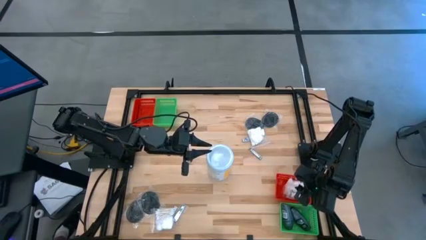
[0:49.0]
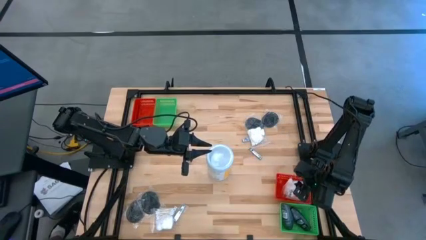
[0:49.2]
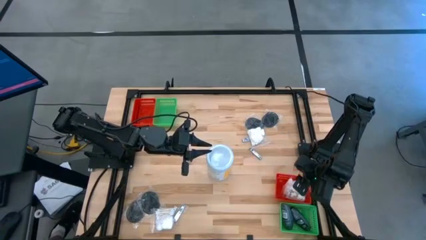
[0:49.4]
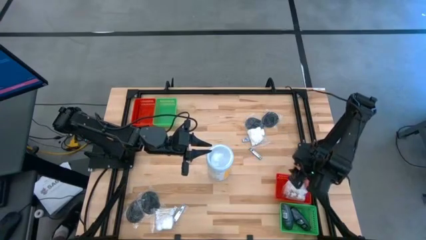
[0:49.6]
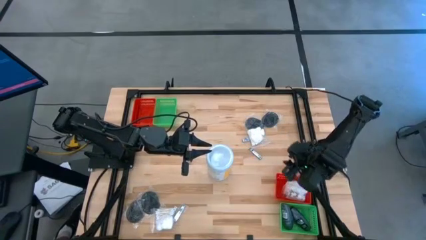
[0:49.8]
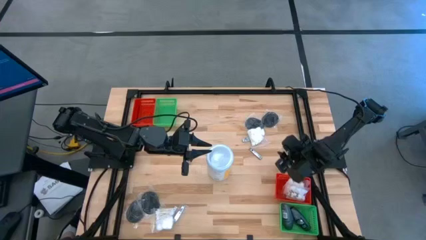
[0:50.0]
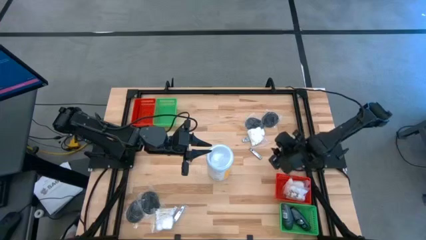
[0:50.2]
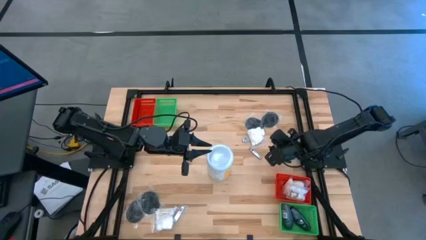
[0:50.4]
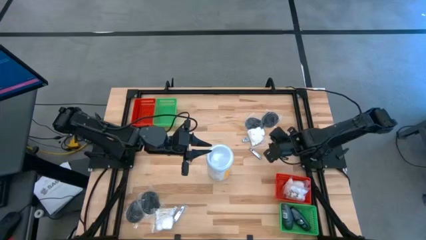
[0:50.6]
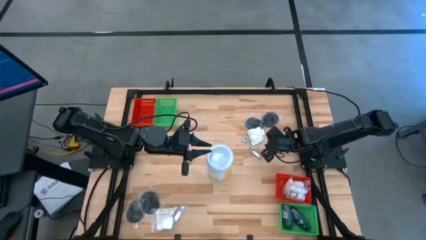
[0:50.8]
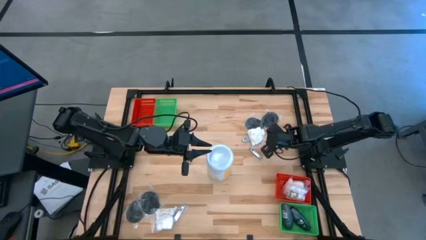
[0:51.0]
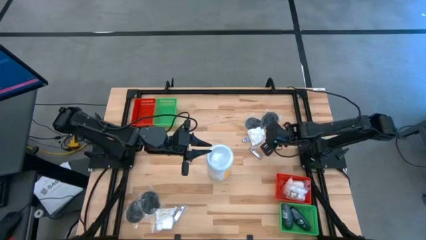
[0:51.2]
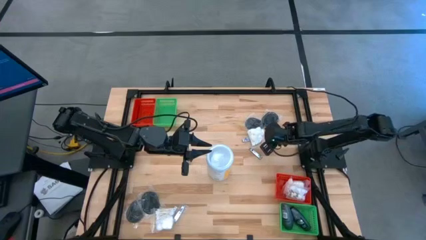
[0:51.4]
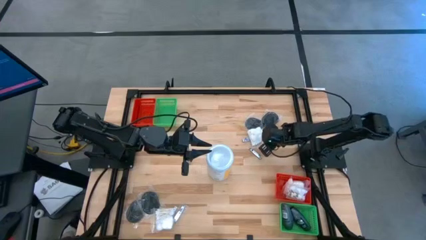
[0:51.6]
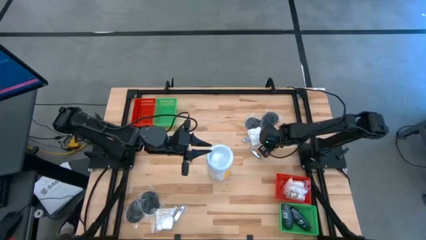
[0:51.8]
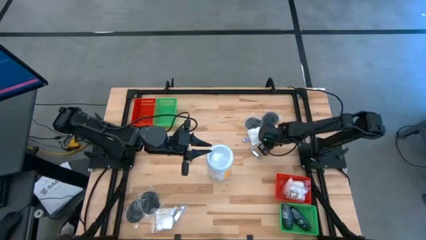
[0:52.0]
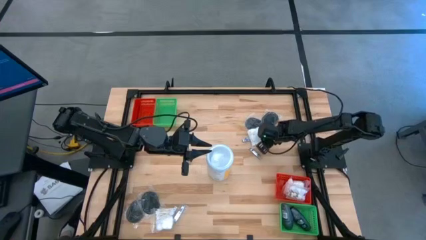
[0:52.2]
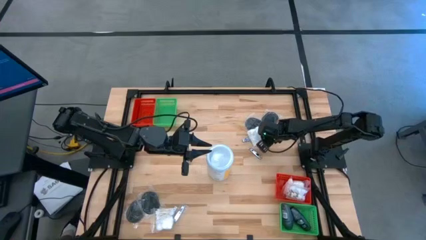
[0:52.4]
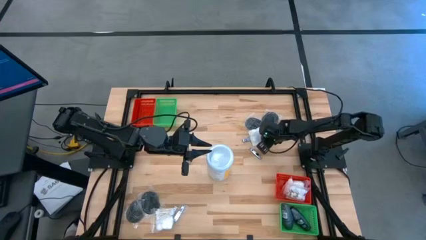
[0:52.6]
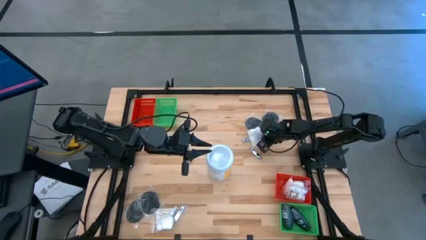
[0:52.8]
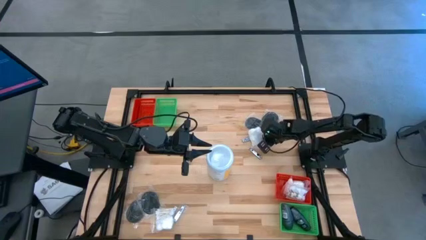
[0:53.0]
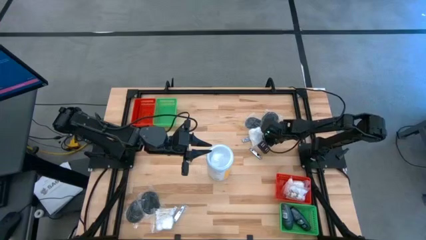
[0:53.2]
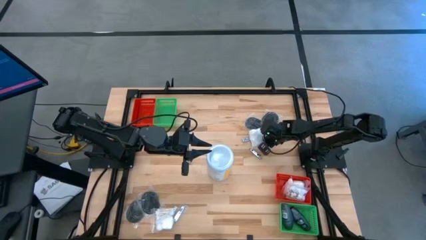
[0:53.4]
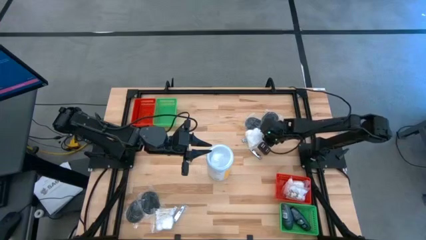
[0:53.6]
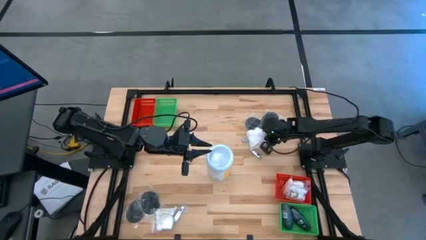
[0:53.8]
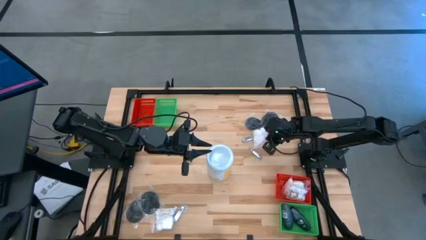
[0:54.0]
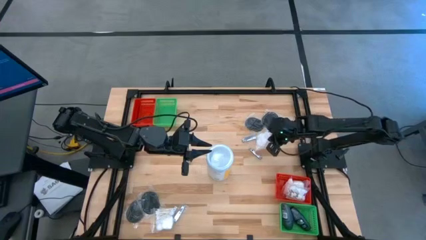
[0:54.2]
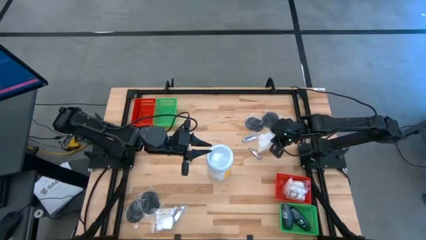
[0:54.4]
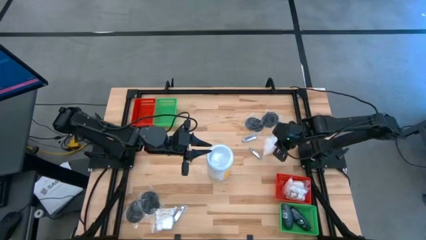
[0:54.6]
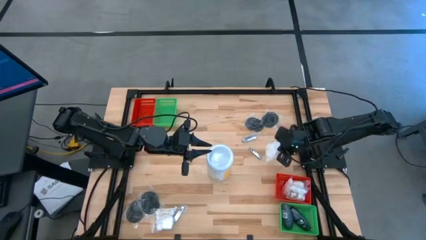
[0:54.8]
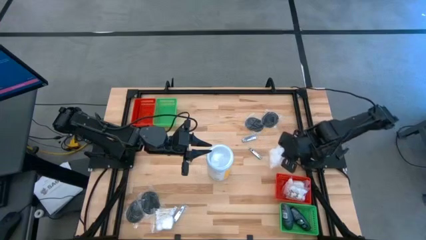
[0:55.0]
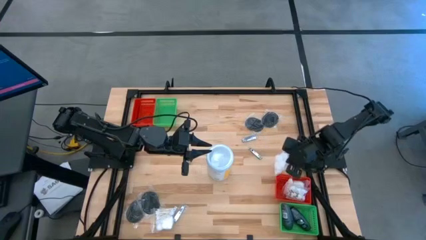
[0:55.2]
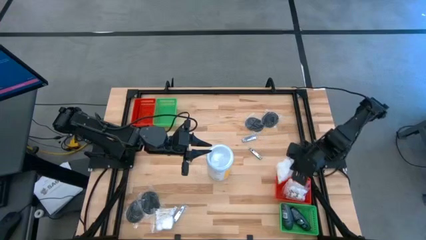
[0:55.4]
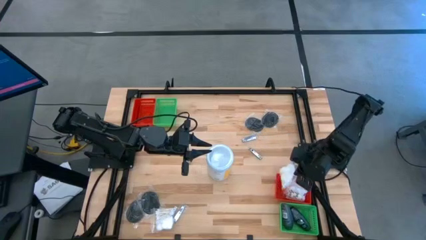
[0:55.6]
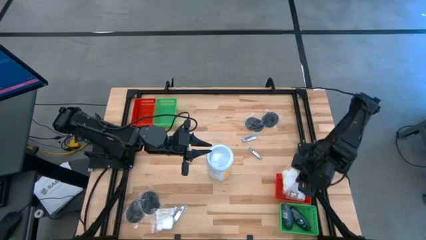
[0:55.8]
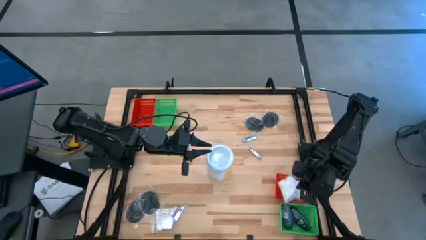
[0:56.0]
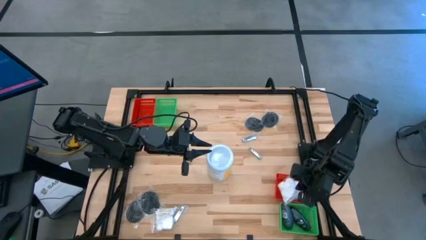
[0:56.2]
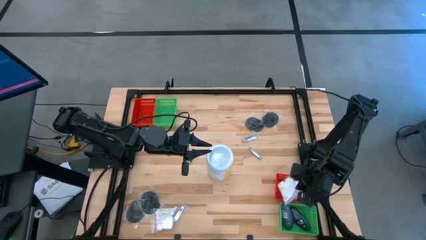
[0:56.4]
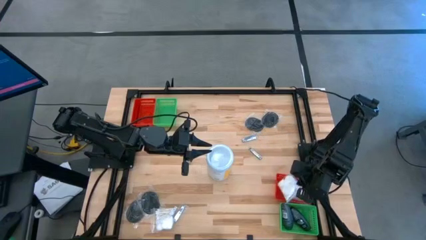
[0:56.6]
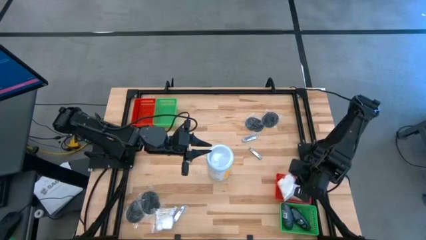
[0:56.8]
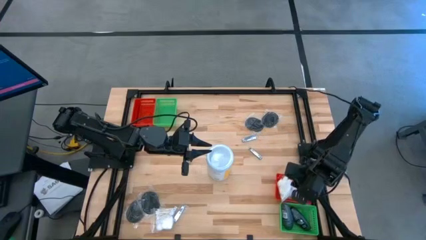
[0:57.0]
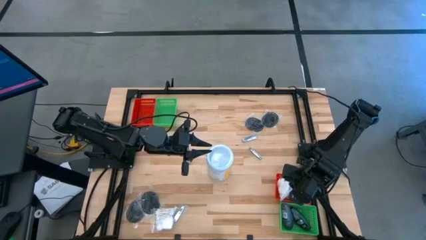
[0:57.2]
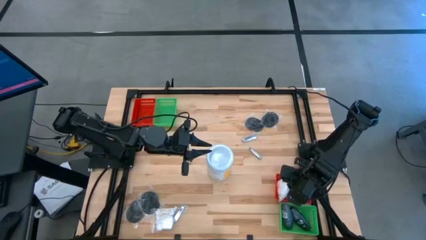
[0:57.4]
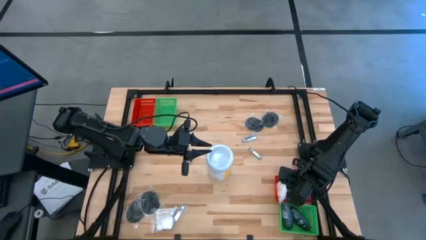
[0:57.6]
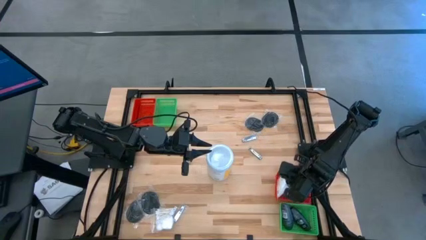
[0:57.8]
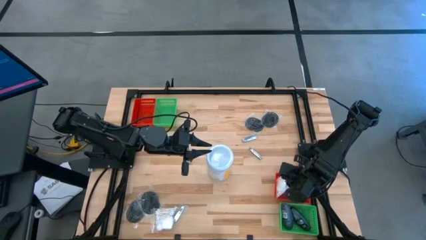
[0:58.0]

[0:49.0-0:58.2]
Task: Pick & Place Travel size toiletries
Put the white cotton pack into the bottom red basket

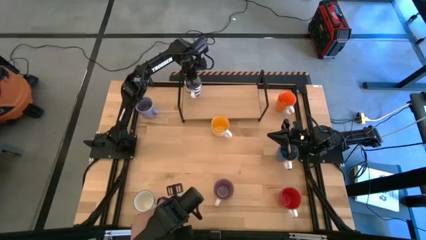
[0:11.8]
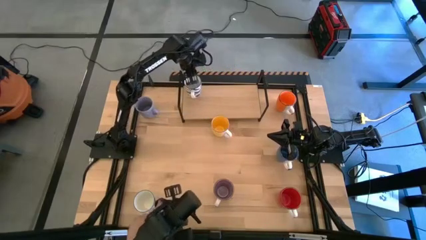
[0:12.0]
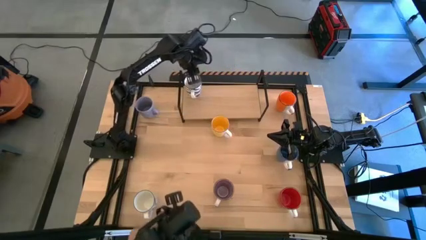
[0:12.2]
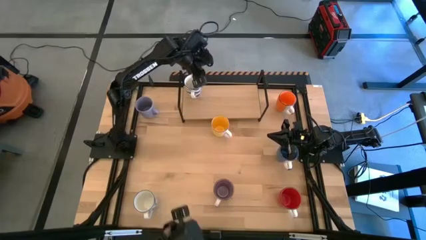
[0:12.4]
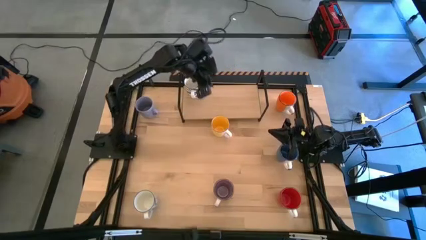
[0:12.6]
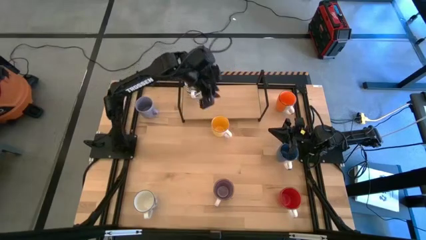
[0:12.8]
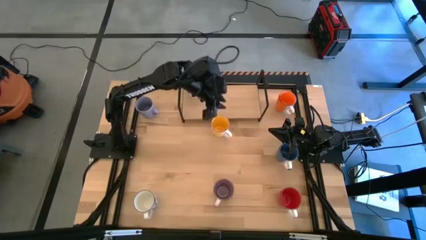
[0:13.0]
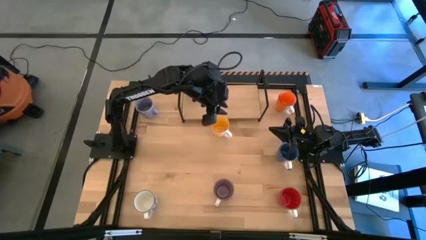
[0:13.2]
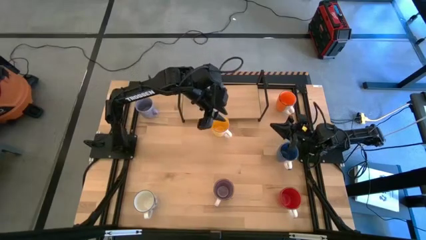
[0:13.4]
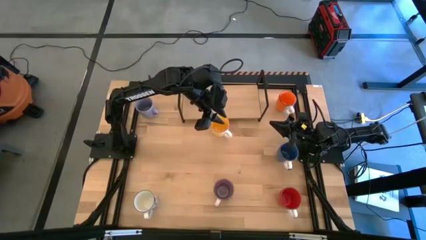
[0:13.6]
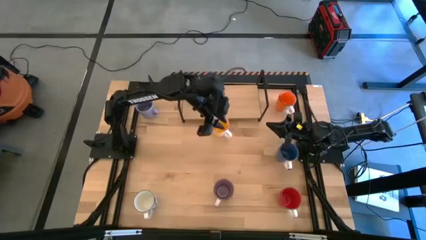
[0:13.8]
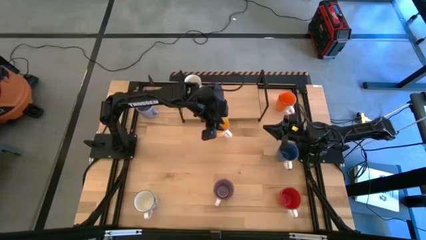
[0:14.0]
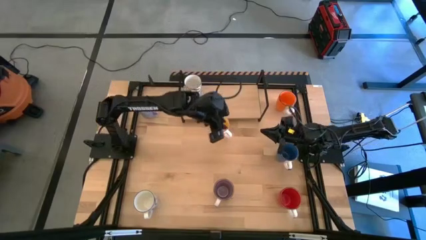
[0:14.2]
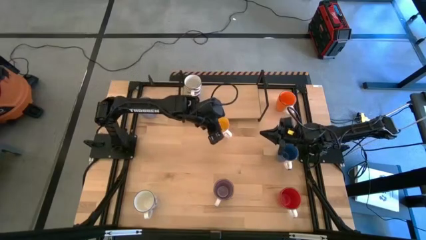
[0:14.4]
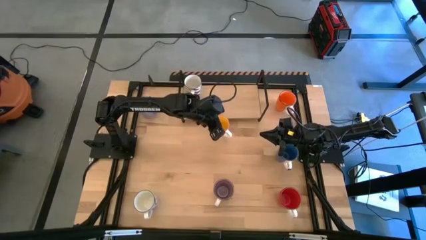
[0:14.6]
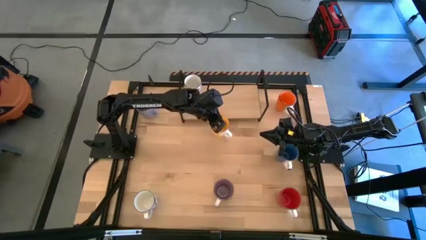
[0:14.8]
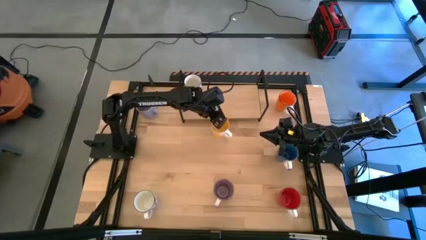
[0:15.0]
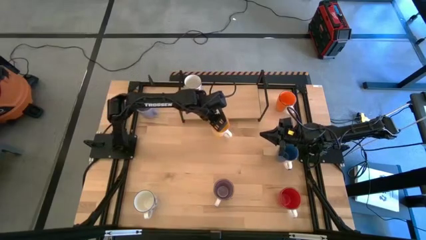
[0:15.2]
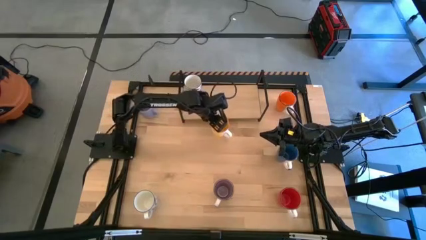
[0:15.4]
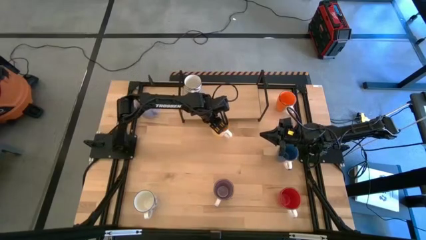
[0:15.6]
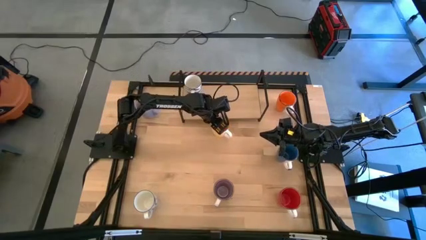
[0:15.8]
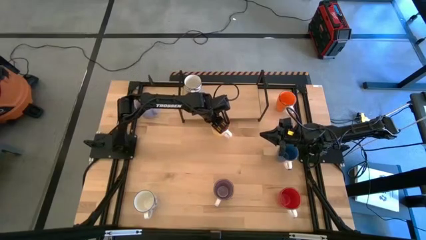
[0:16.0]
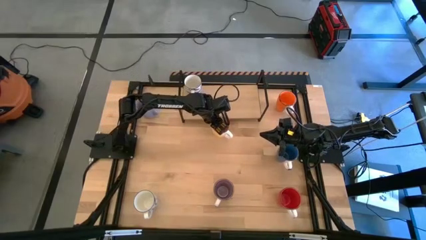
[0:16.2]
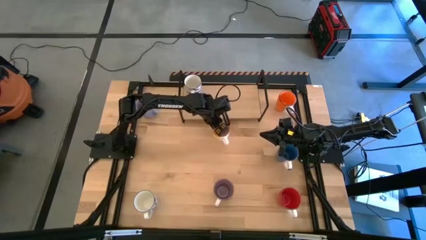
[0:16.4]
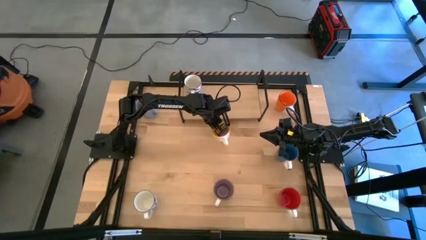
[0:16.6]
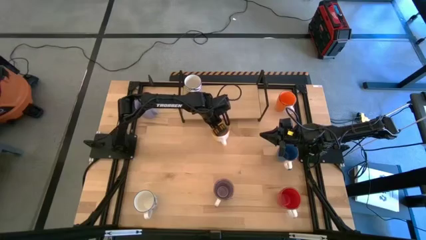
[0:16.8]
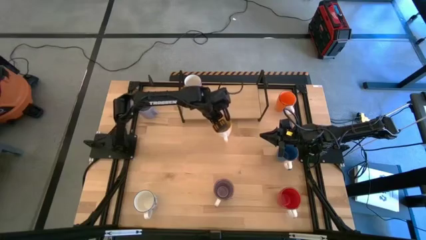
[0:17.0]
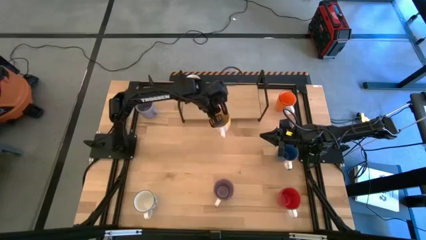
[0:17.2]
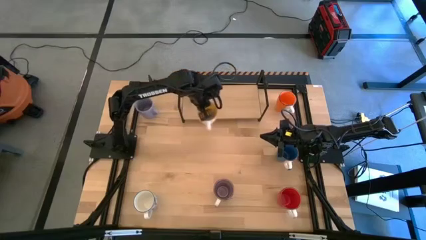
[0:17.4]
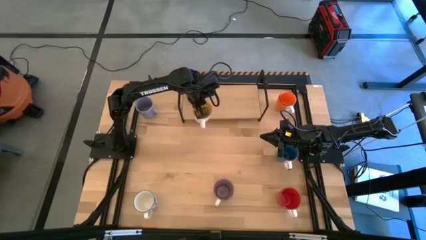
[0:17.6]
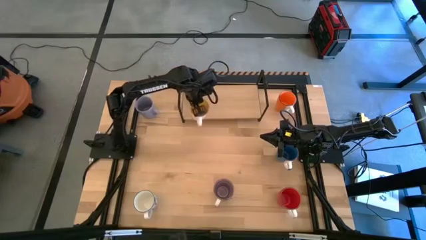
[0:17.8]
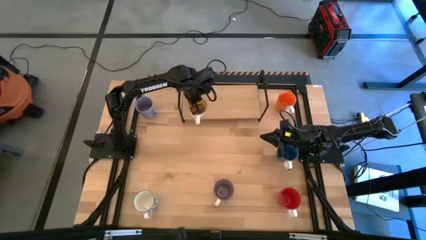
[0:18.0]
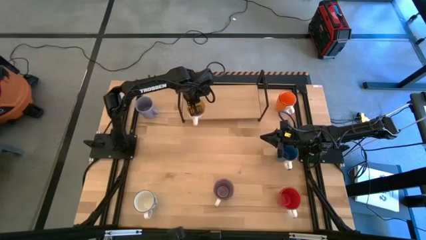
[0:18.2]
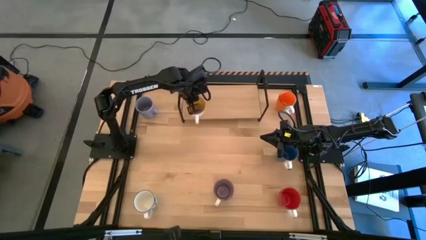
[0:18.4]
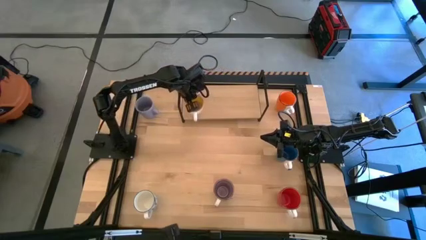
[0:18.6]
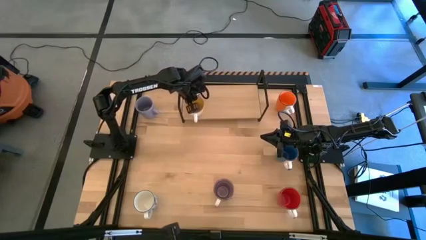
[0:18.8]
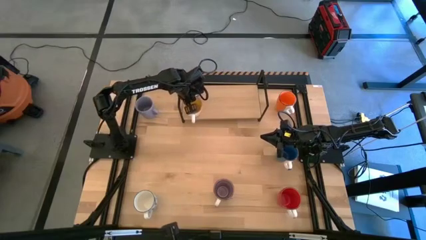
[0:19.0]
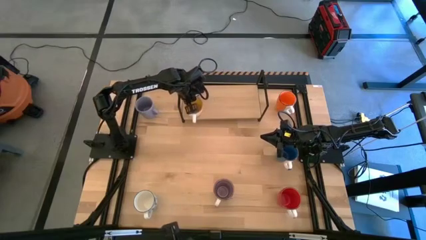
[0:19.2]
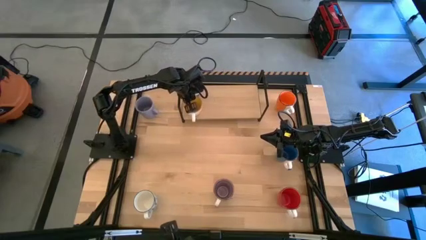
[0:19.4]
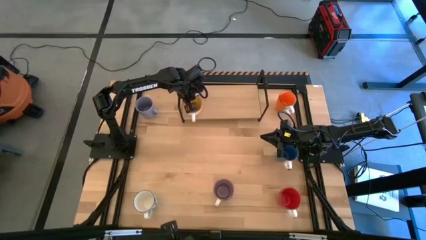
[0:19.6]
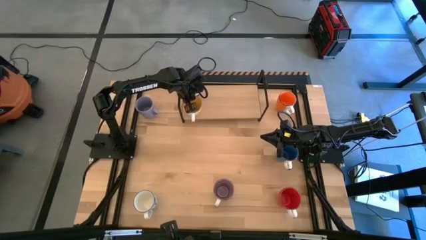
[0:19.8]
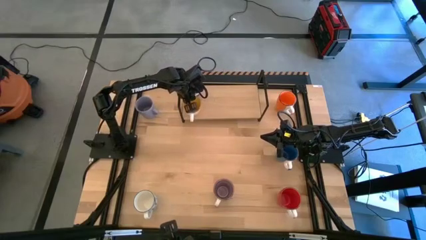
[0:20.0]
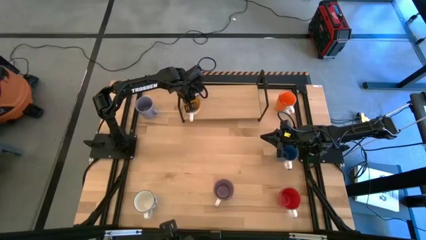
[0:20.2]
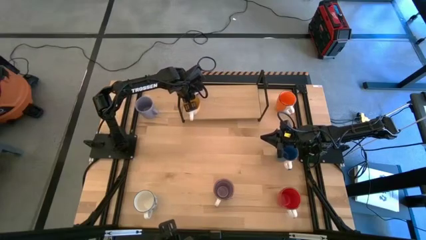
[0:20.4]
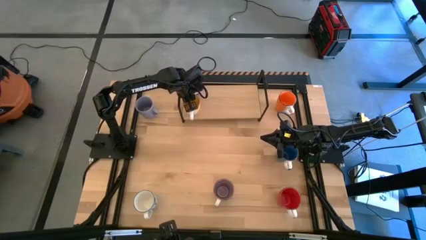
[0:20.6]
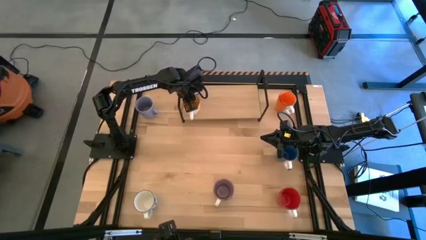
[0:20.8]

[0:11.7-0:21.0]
Task: Place coffee mugs
Put the yellow mug on the shelf
